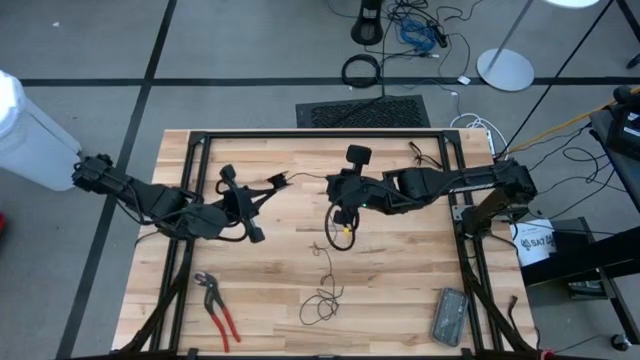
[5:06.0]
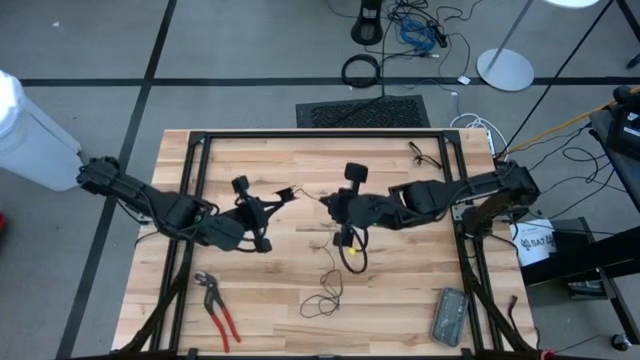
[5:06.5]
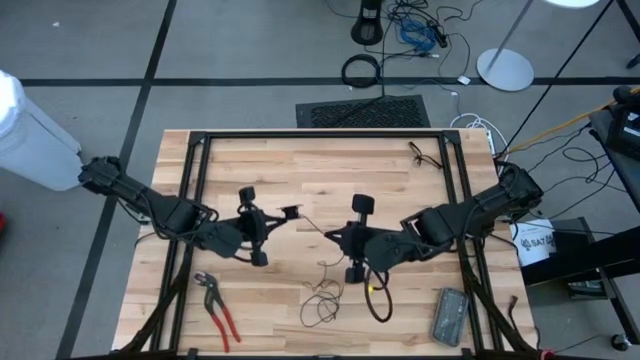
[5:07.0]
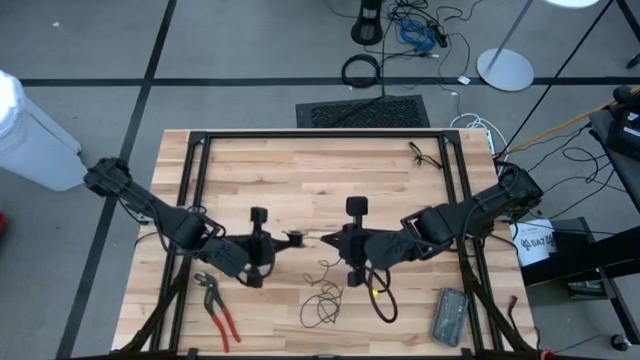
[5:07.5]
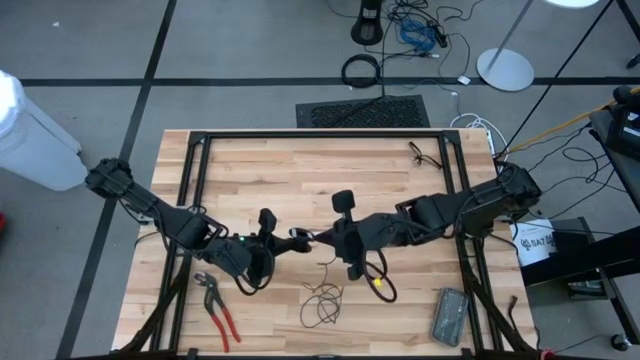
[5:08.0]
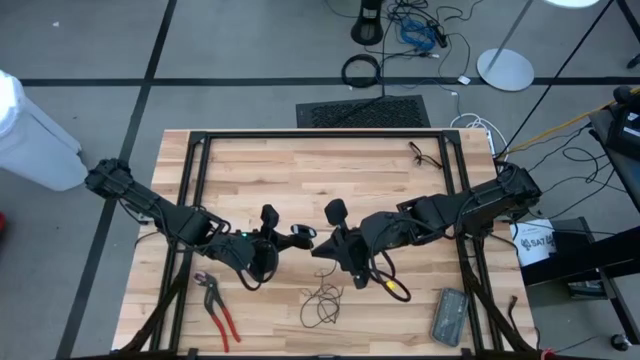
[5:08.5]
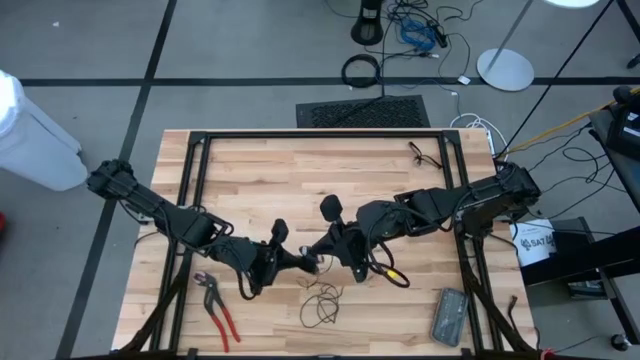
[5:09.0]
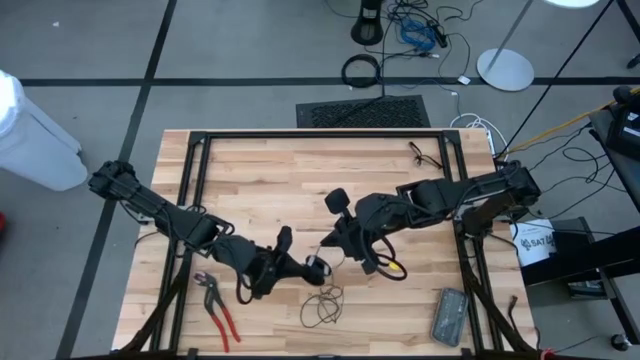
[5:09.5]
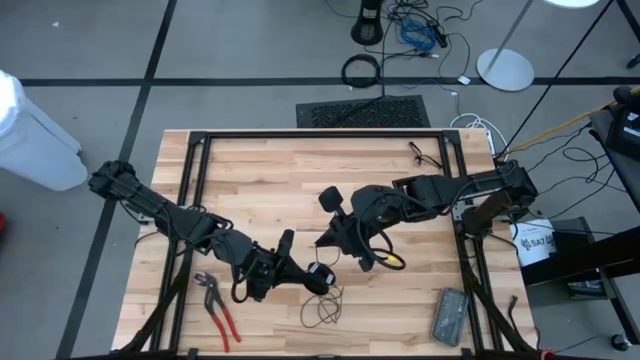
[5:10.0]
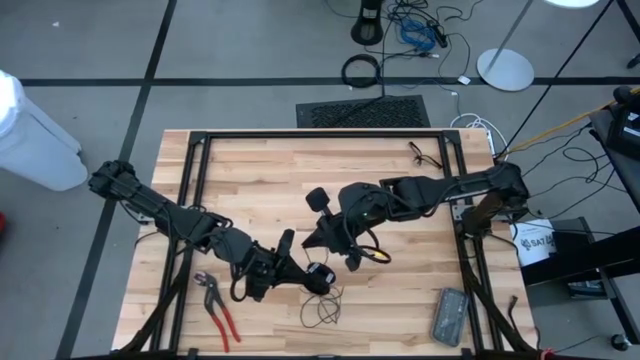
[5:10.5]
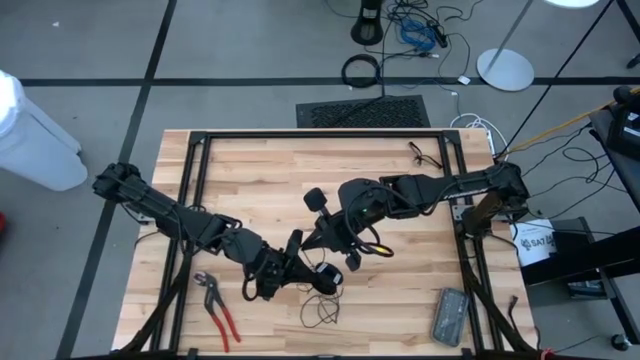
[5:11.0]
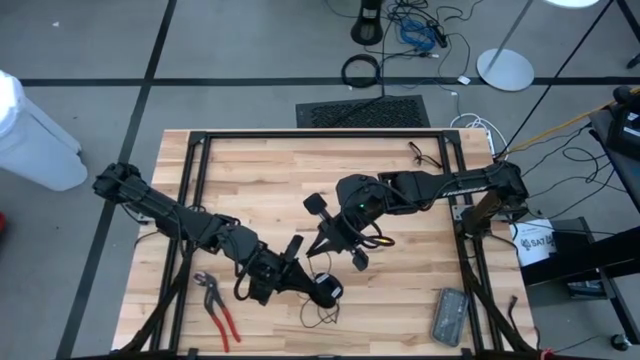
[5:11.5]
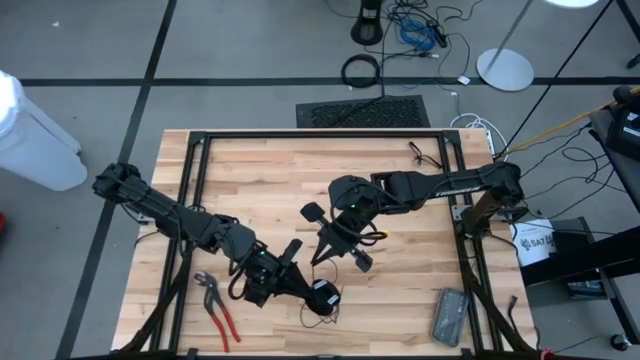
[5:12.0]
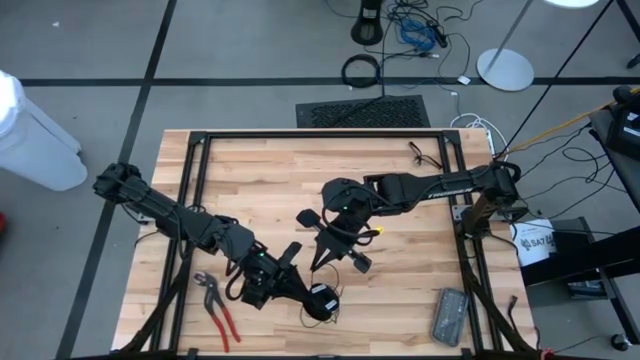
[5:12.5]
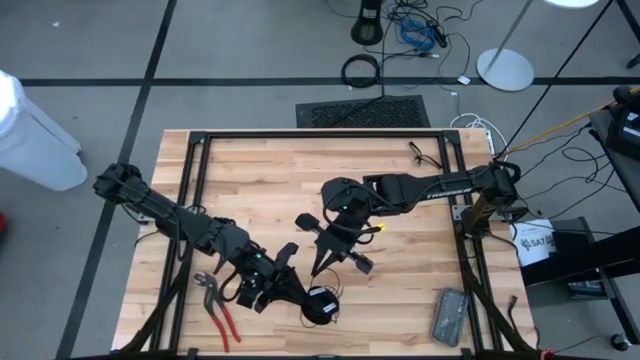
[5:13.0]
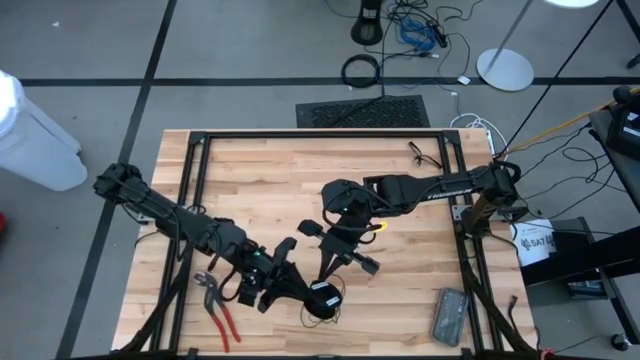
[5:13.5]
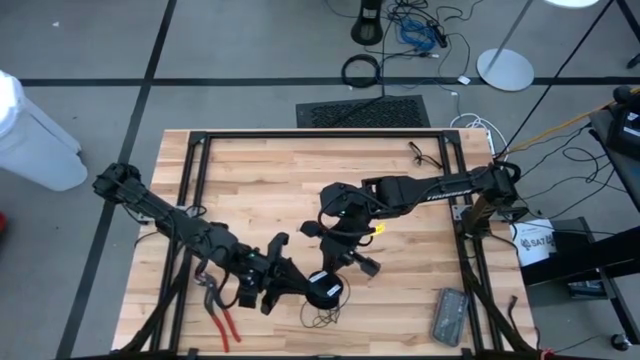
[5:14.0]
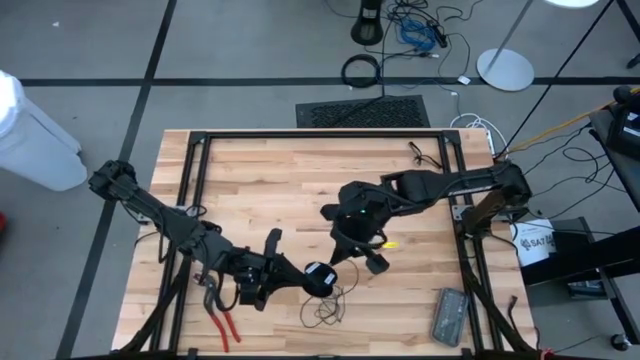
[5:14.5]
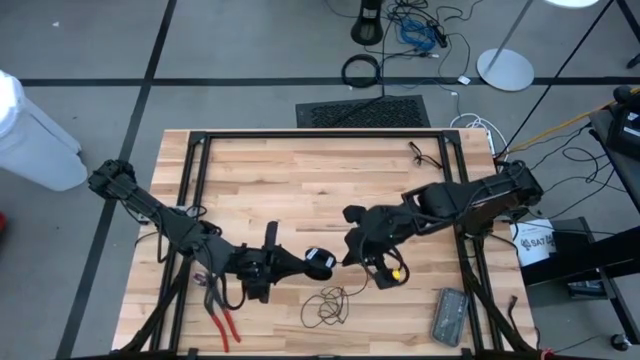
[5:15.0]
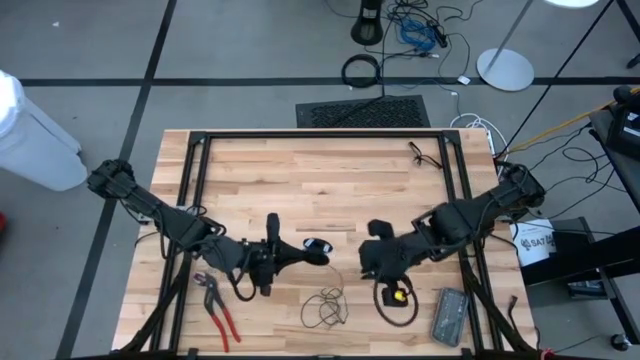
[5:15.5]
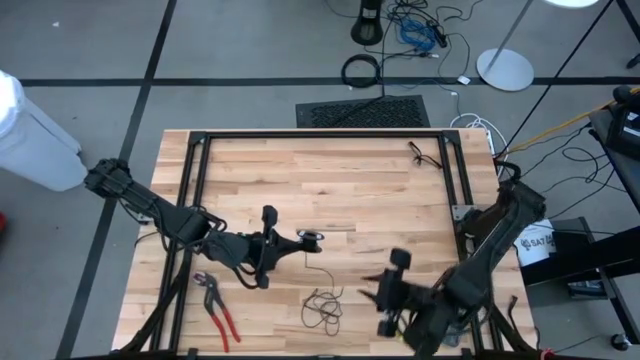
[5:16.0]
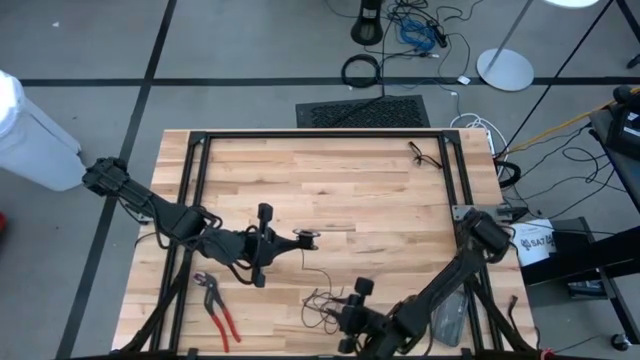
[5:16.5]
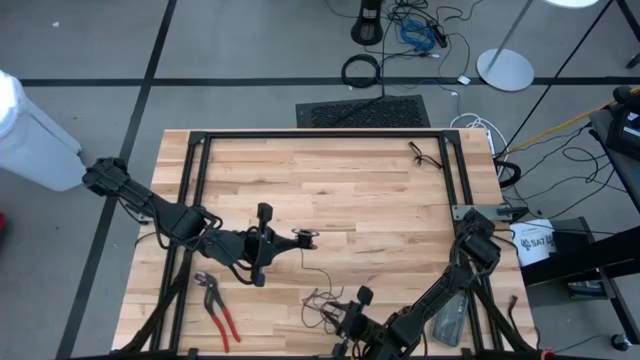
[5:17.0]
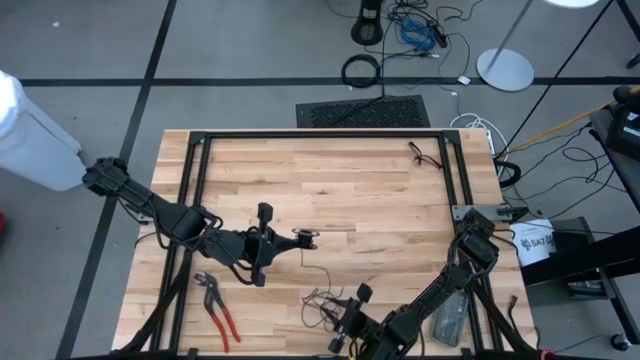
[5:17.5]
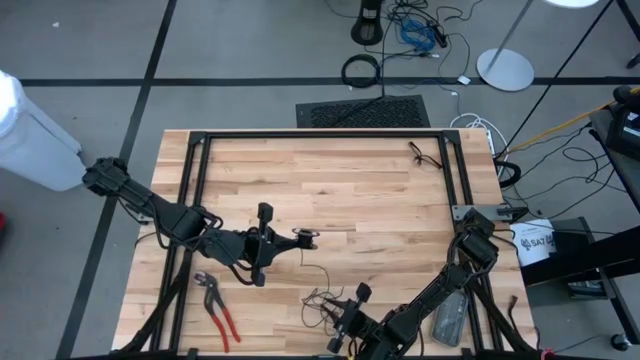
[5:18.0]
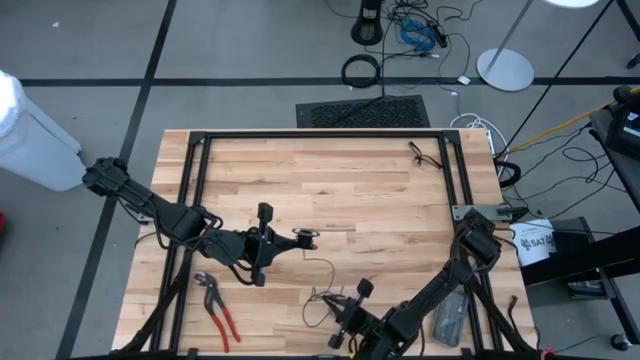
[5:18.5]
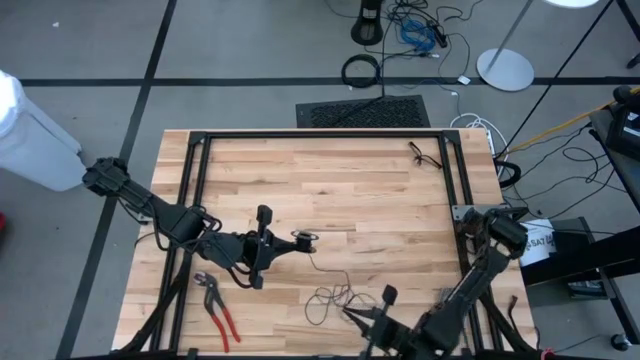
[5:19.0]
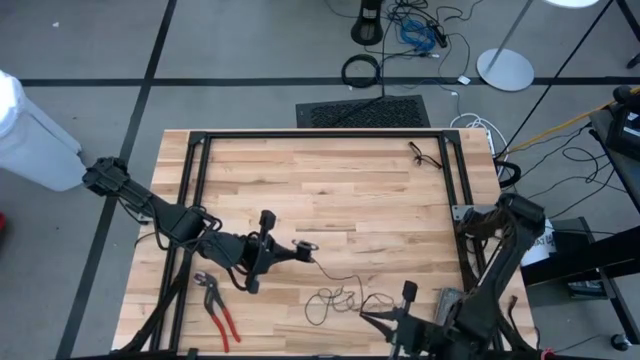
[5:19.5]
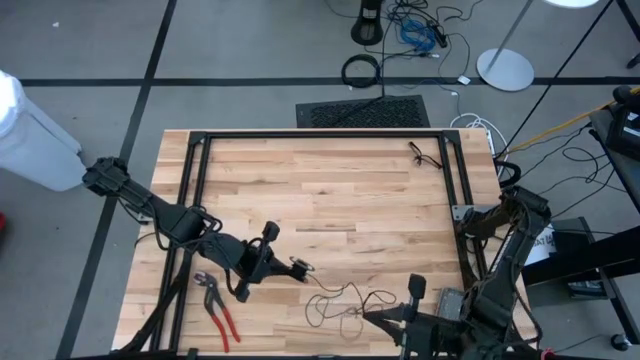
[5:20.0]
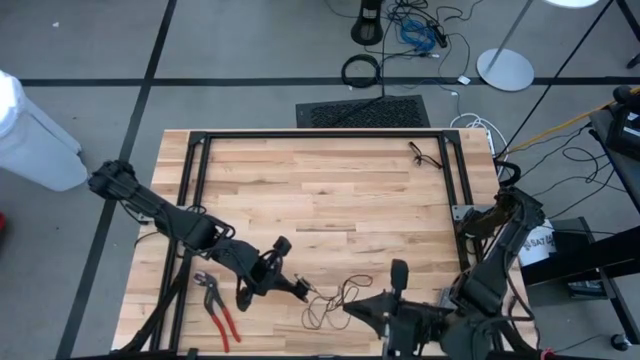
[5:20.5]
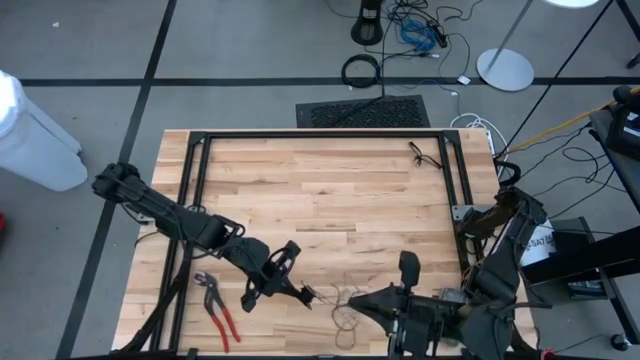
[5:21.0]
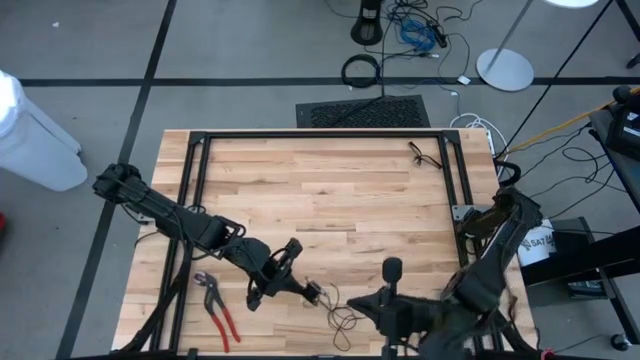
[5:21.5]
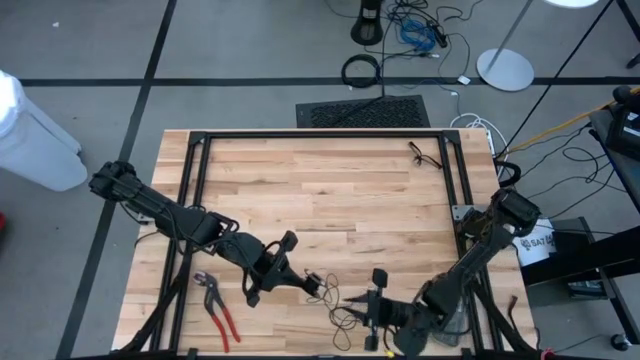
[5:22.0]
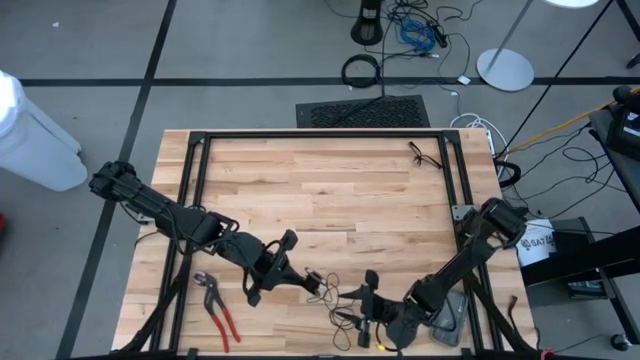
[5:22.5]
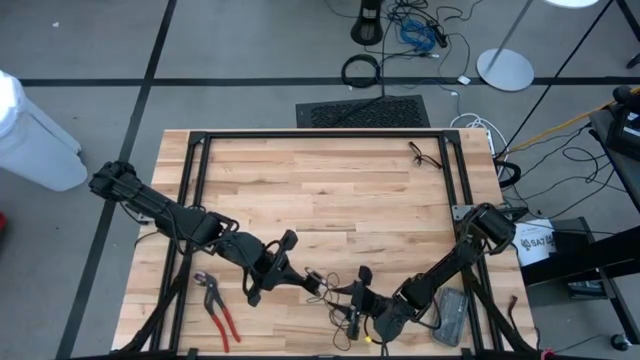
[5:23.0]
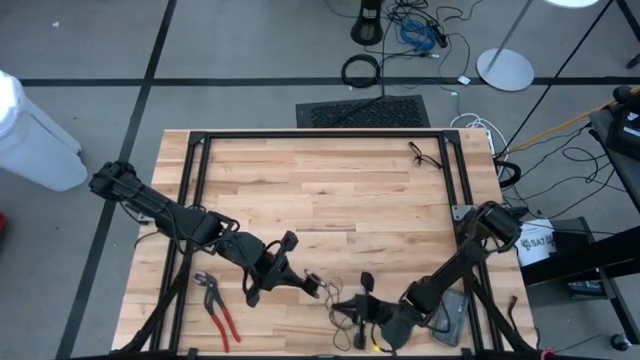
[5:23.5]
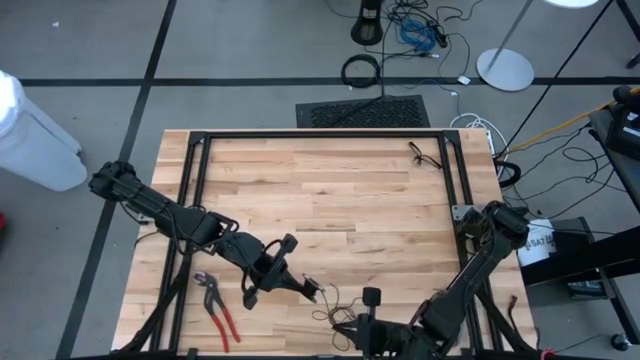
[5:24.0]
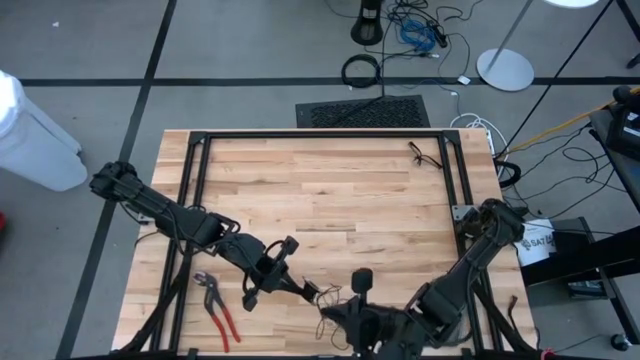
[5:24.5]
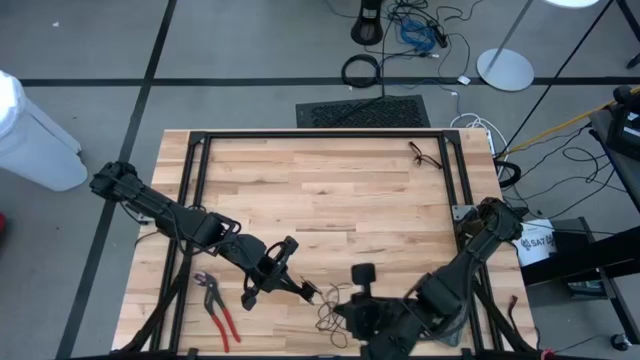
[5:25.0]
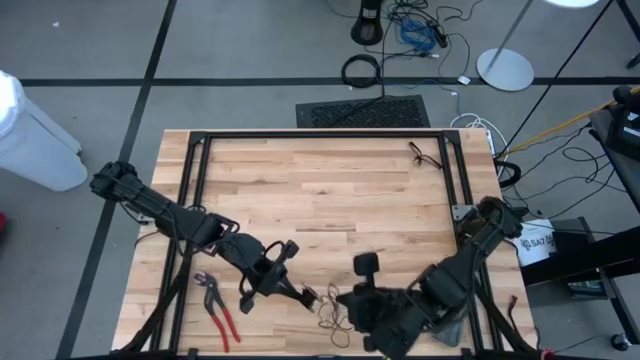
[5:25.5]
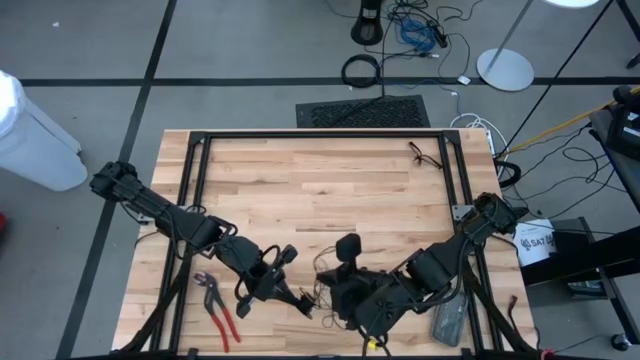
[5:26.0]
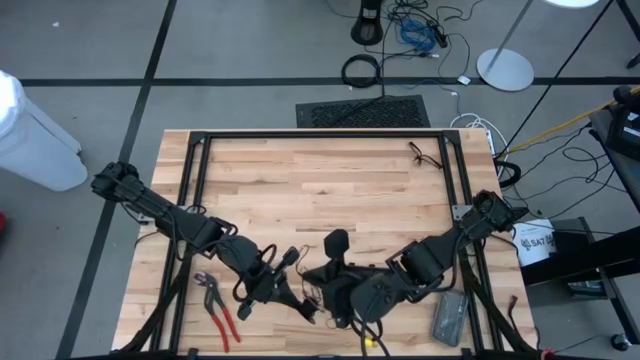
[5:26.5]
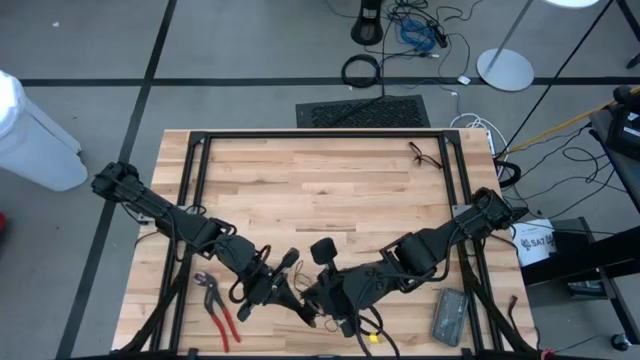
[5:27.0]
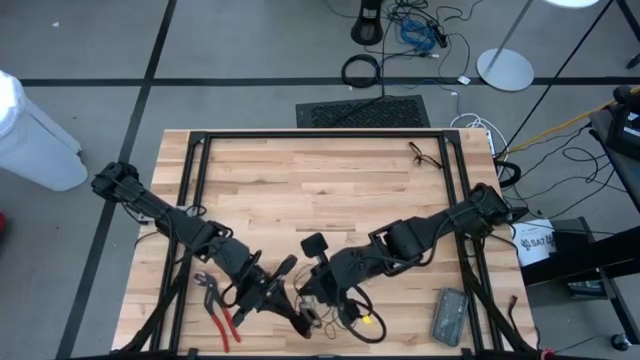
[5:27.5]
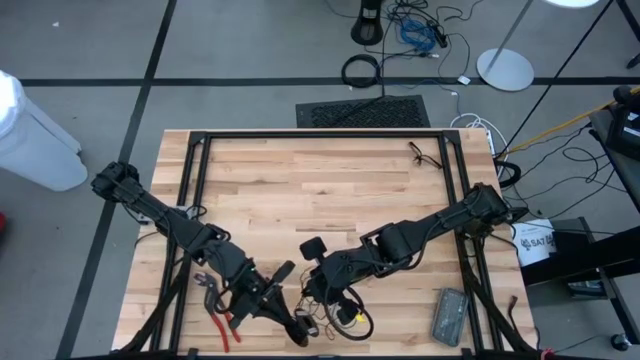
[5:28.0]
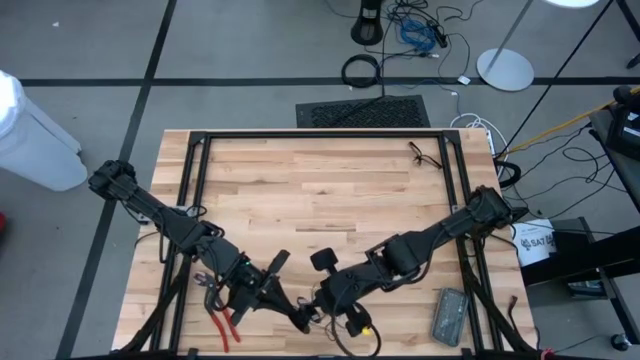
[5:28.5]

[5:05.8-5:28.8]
Task: Coil cords
Coil the black wire onto the black spool
